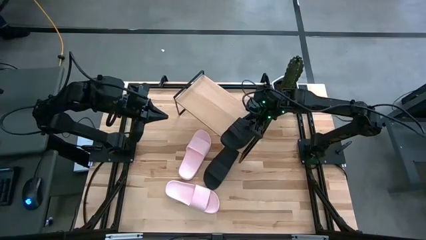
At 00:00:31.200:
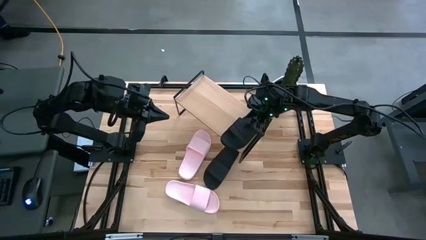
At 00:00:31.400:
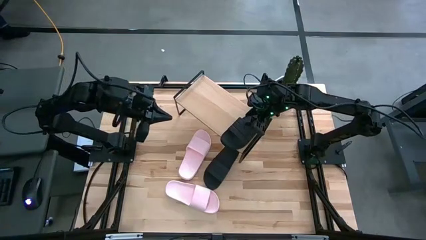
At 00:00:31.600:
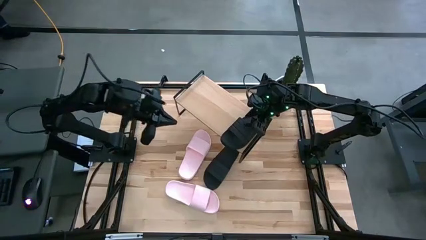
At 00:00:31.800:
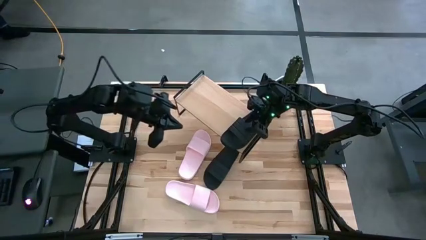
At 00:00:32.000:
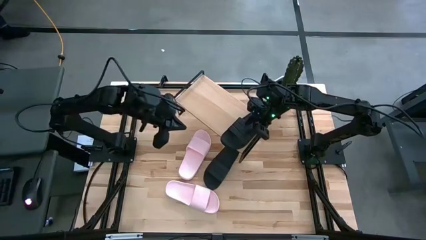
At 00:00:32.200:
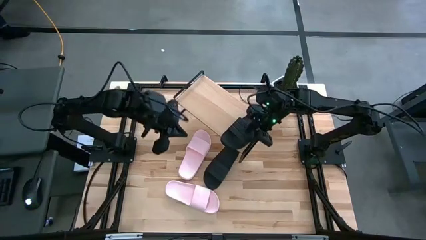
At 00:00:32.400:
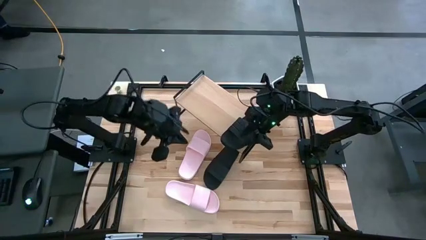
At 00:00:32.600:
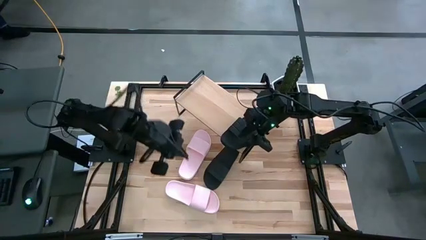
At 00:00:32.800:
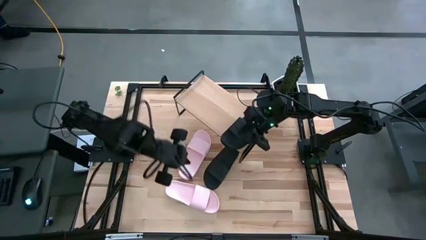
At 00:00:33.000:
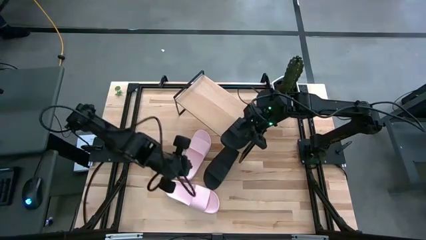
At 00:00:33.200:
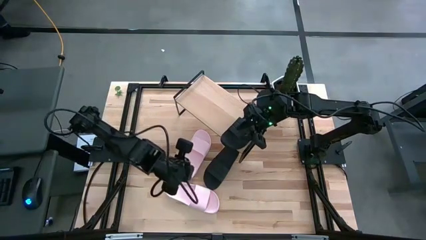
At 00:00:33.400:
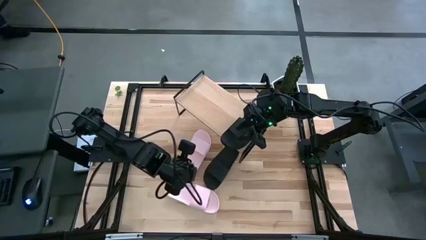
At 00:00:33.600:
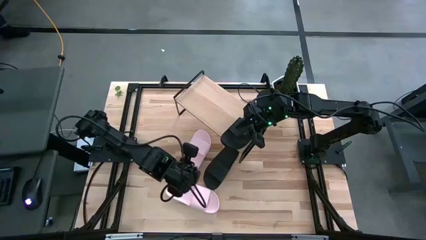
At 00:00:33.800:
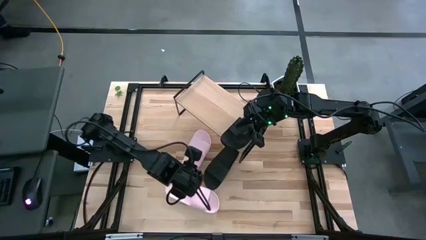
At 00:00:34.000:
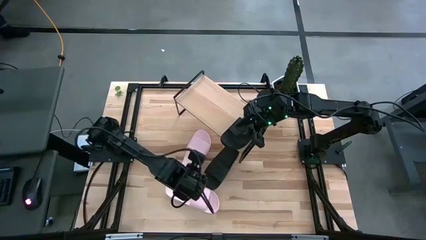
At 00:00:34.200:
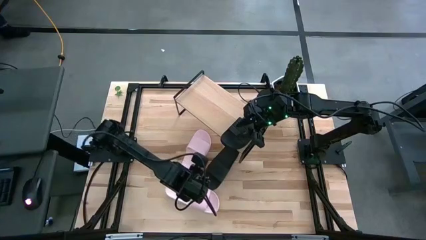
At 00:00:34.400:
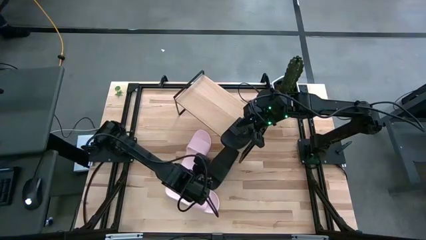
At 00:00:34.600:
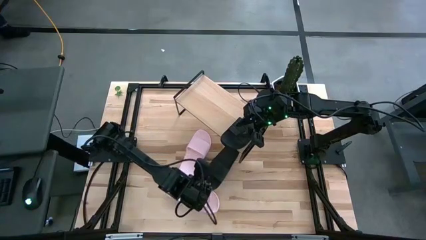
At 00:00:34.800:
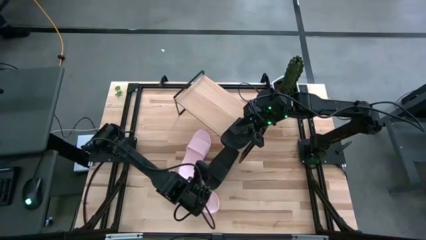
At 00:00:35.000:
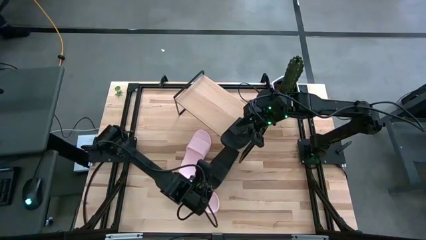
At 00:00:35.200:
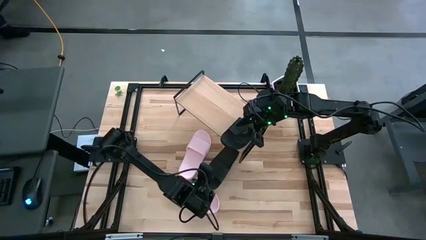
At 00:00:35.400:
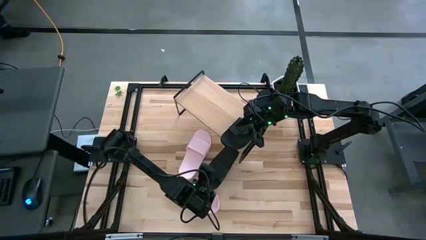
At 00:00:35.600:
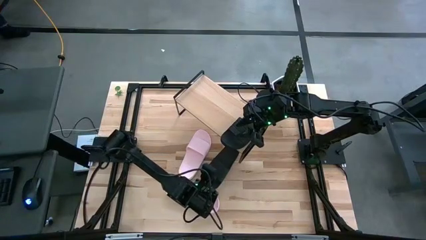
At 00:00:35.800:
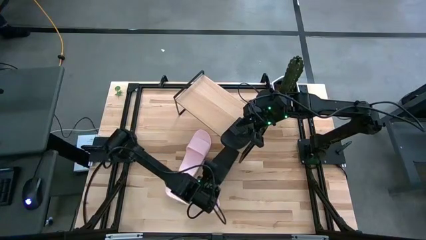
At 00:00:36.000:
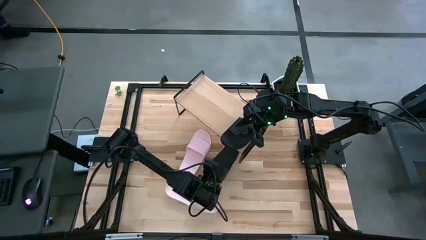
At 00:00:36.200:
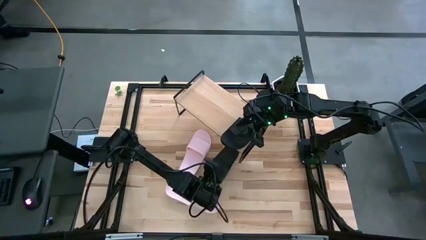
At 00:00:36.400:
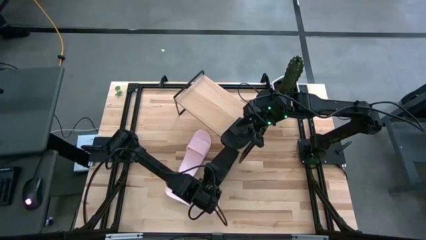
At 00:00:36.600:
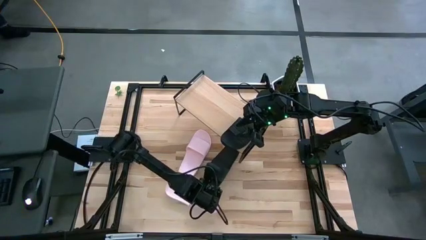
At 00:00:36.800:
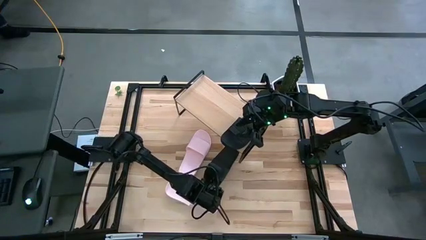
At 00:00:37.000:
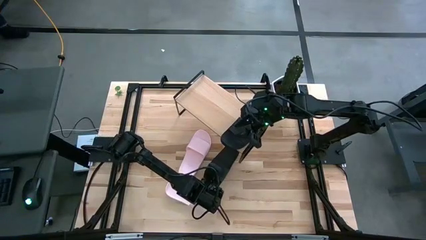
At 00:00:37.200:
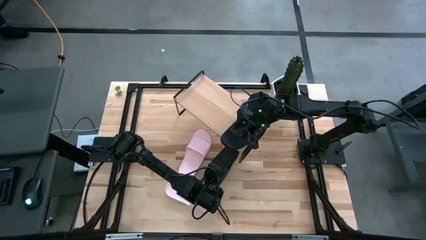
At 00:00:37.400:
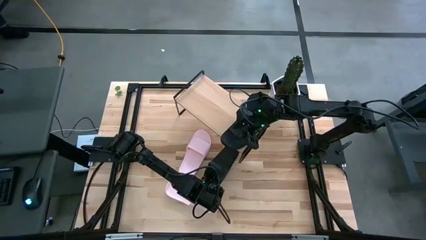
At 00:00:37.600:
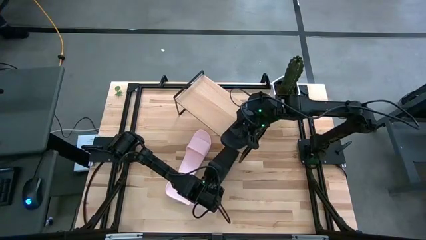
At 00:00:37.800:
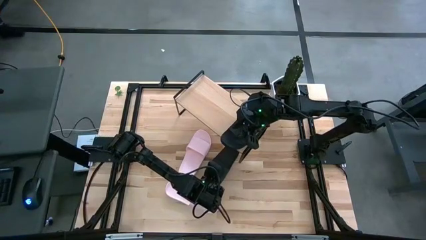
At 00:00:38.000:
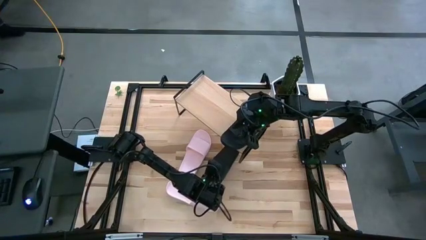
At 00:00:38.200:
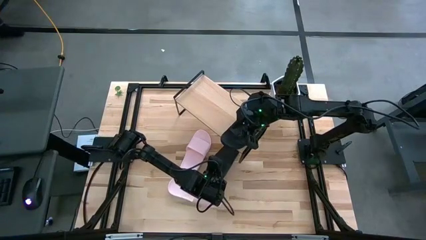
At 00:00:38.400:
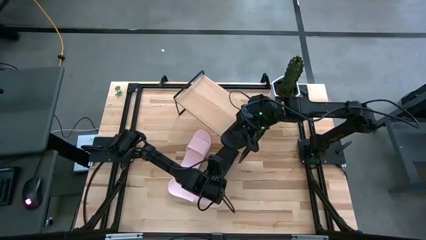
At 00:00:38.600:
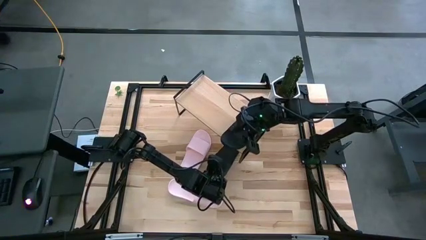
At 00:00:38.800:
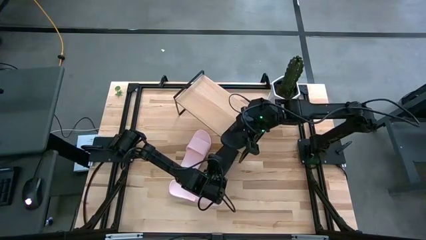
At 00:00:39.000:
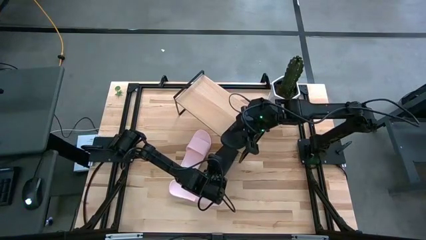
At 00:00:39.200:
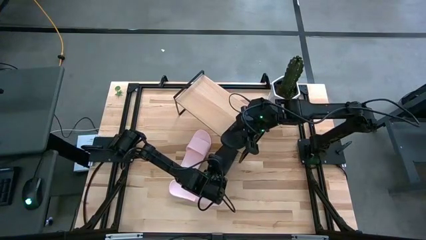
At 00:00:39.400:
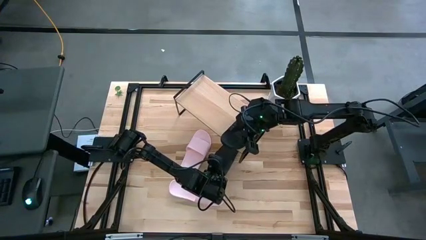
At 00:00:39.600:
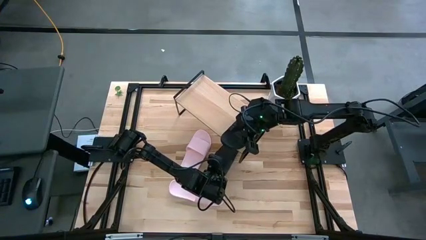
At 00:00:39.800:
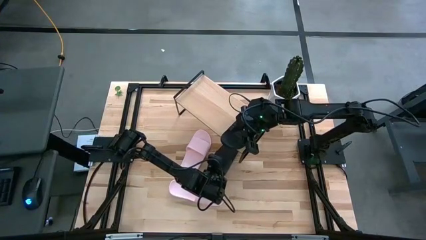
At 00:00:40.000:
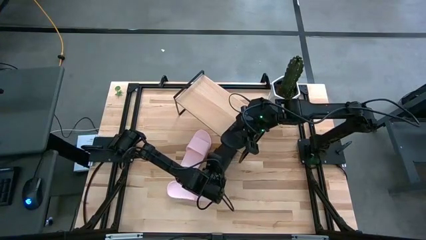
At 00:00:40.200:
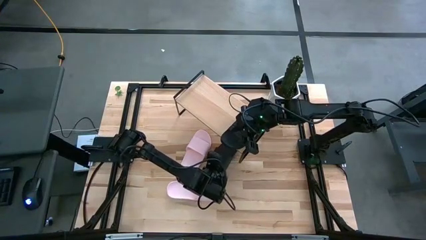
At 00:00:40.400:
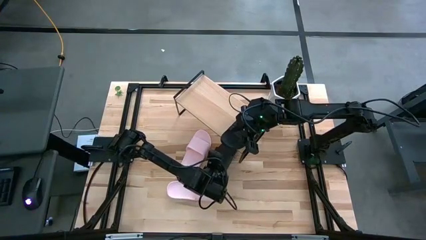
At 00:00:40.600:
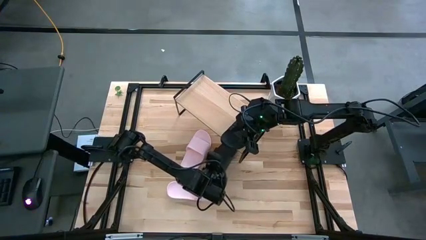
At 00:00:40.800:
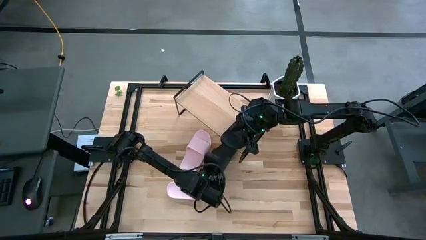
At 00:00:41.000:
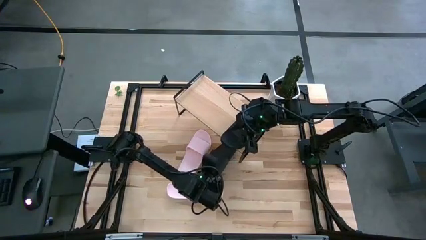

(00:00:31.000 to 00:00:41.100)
Task: Pick and place slides into the shelf
Put the black slipper on the shelf

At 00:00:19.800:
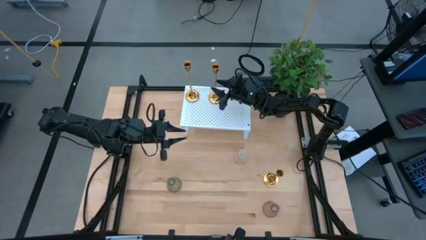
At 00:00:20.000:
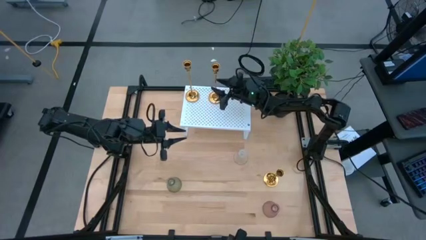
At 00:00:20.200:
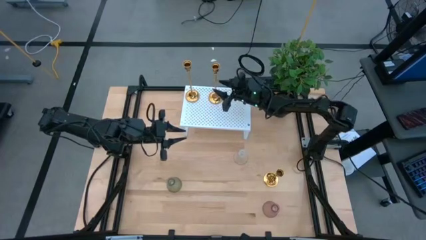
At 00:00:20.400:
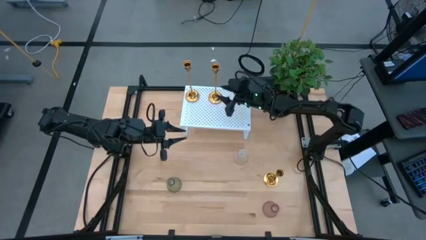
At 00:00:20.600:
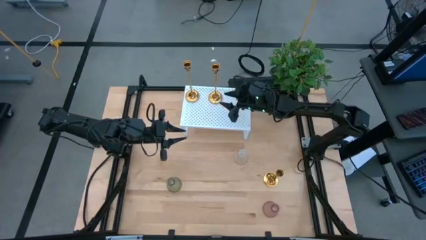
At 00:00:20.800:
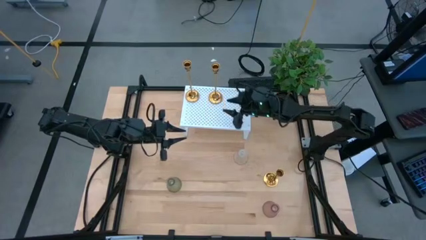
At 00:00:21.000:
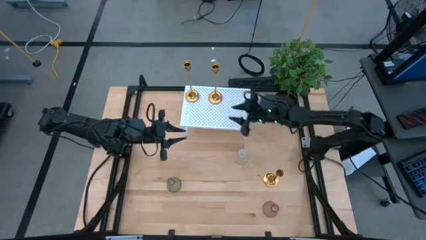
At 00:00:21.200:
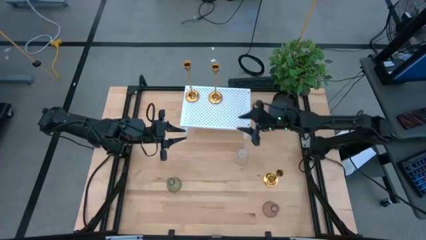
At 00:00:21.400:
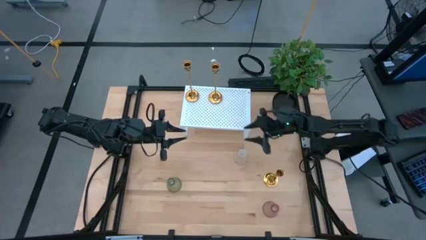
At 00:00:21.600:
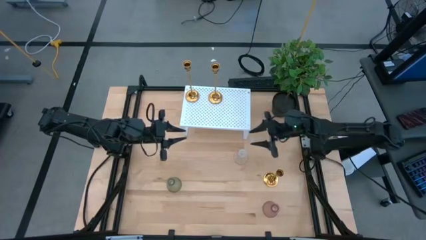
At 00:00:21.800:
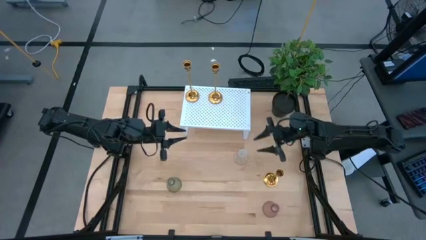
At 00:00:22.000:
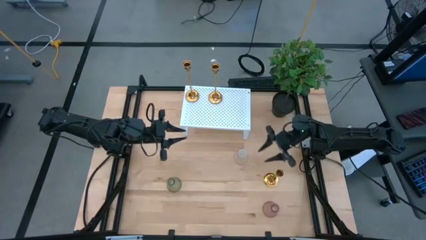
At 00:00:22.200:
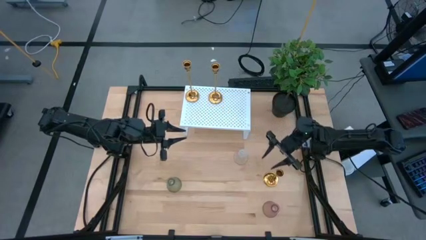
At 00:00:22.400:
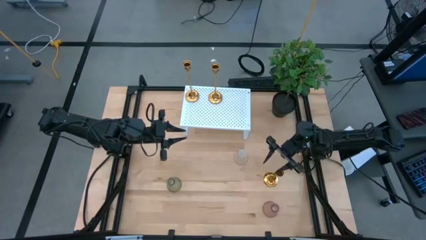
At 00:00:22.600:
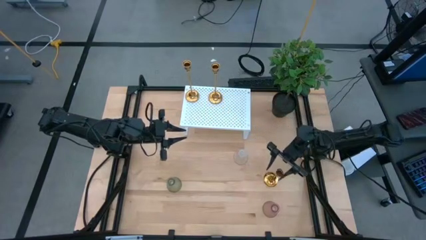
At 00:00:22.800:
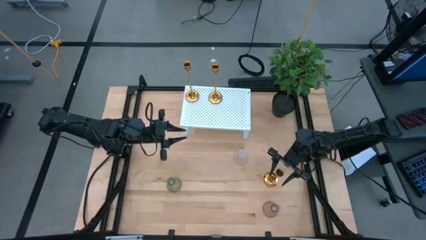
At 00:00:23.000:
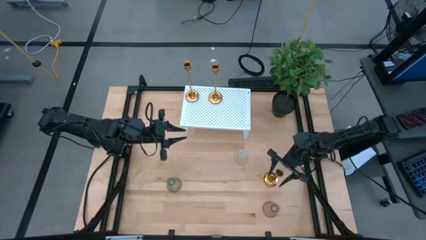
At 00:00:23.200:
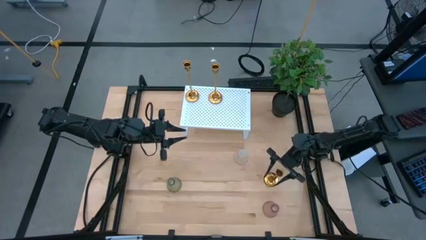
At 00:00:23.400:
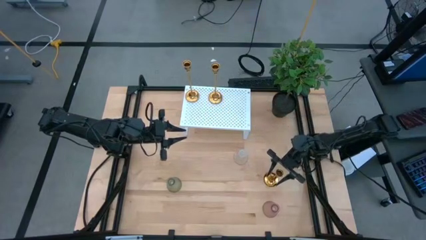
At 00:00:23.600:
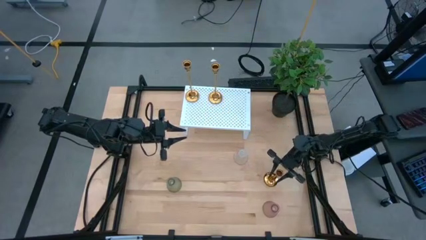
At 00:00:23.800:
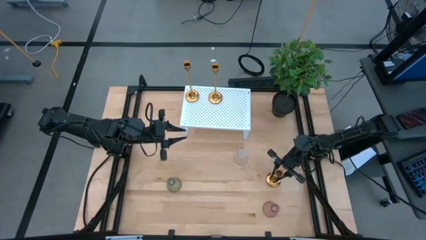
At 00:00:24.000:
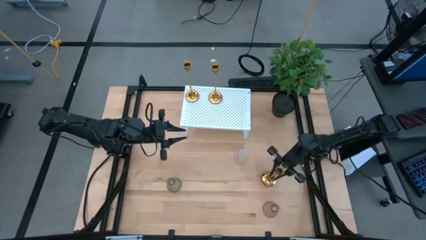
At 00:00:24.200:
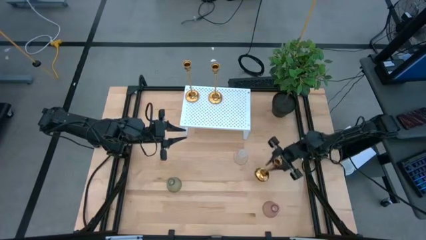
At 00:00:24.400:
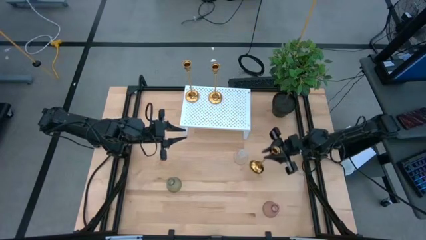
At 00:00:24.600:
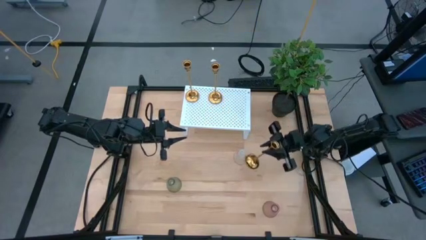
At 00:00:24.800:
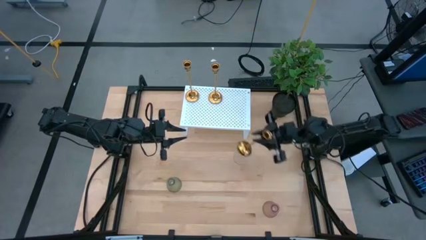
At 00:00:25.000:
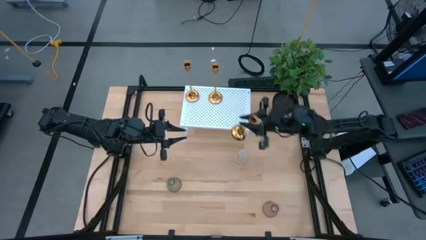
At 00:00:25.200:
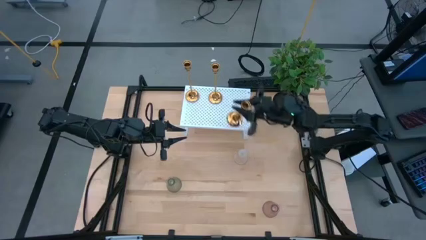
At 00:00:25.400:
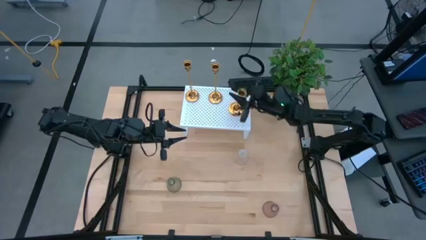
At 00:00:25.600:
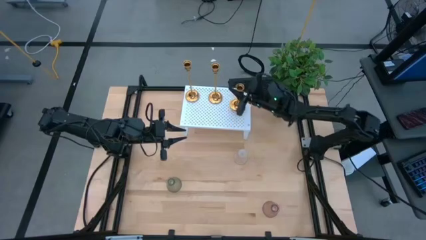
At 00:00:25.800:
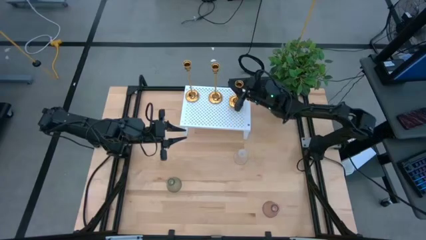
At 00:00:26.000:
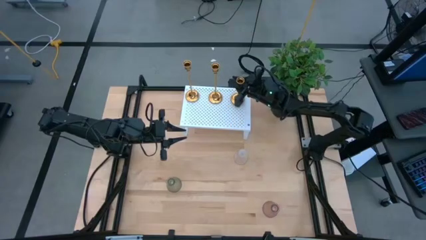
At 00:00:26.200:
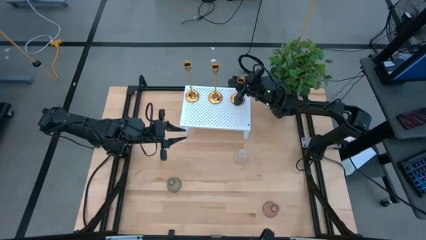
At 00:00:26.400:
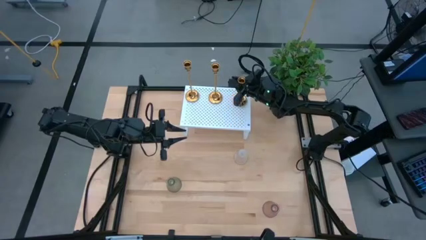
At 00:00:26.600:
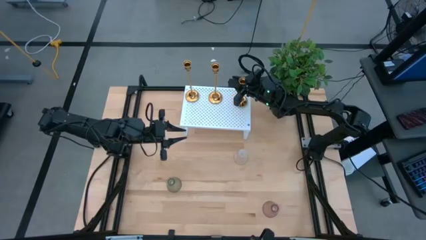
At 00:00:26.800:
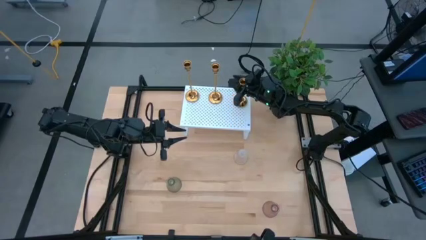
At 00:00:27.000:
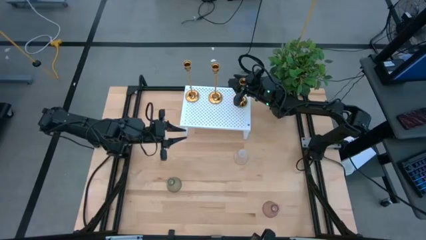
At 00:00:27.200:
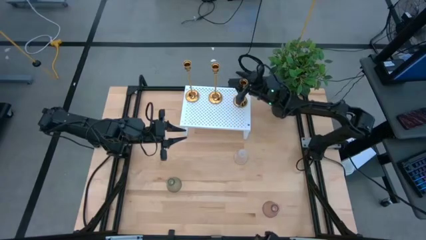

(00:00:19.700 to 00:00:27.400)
Task: Pick & Place candle stick holders
Put the gold candle holder on the shelf aligned with the other gold candle holders
